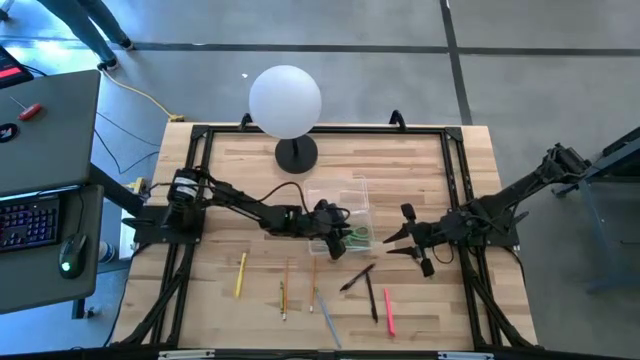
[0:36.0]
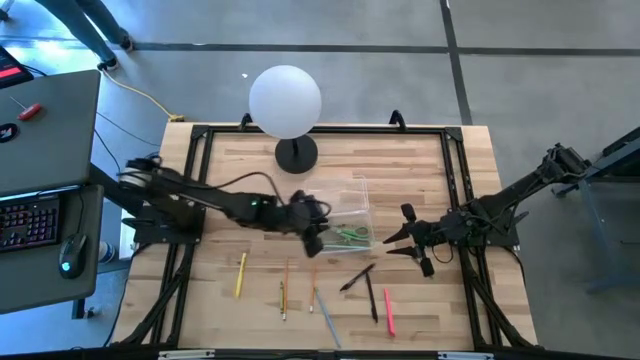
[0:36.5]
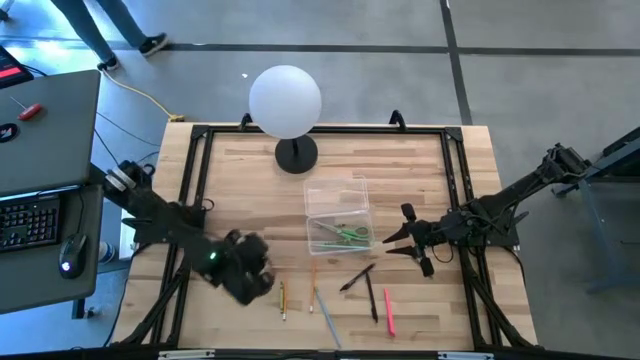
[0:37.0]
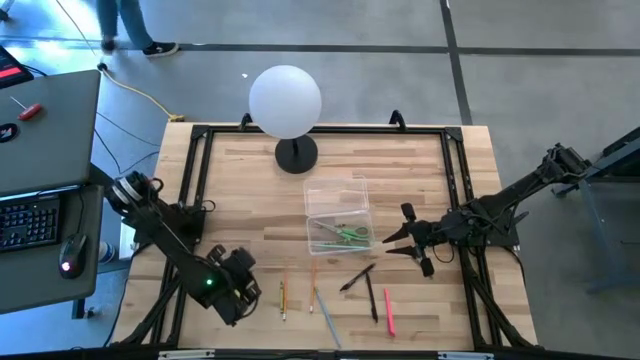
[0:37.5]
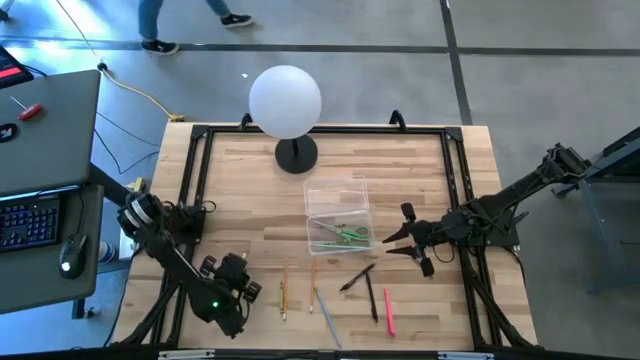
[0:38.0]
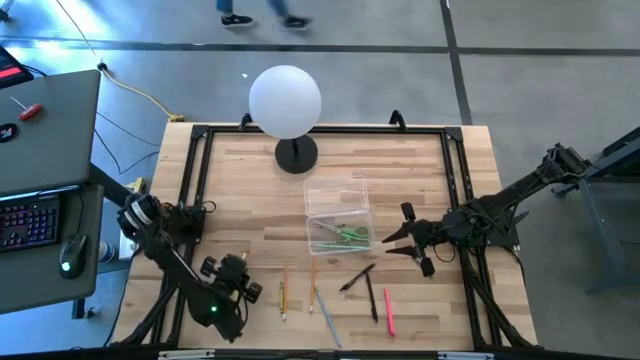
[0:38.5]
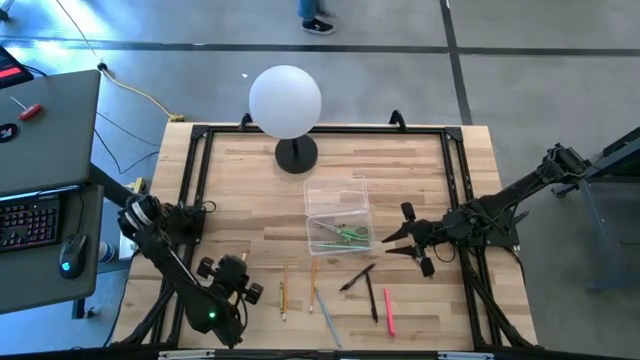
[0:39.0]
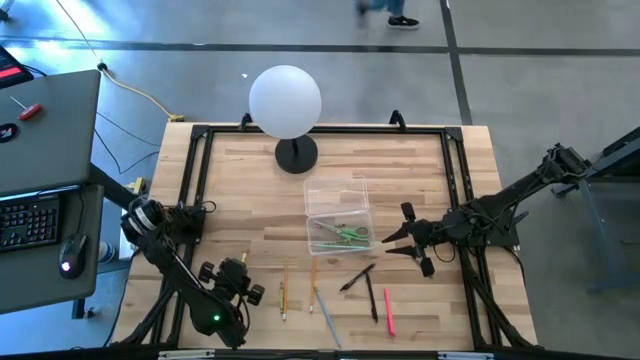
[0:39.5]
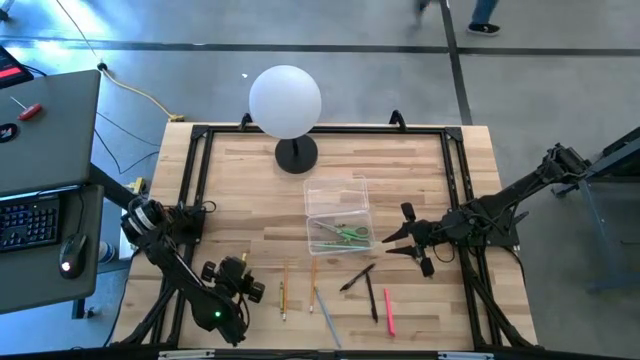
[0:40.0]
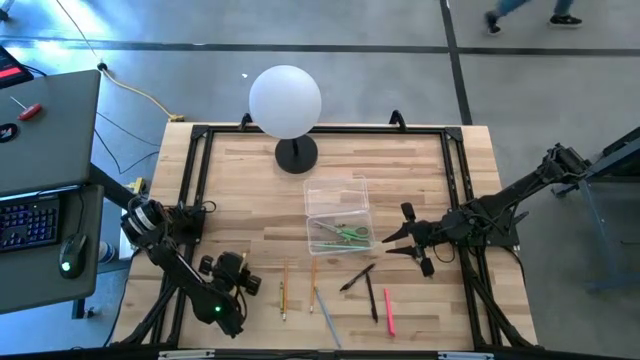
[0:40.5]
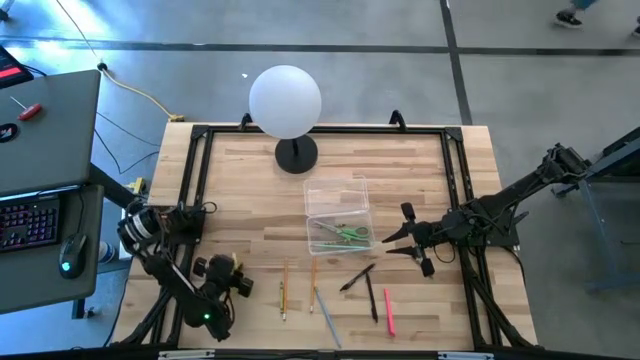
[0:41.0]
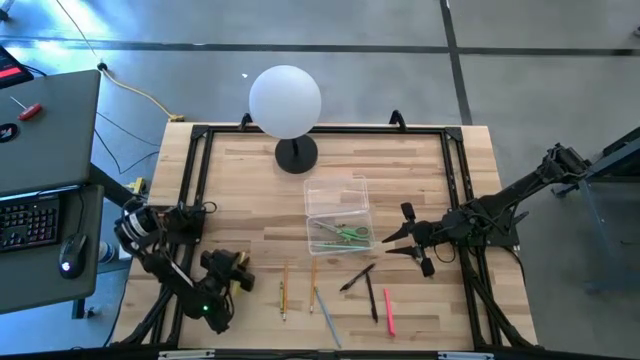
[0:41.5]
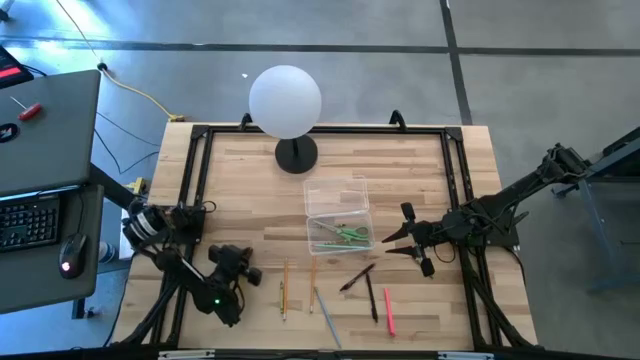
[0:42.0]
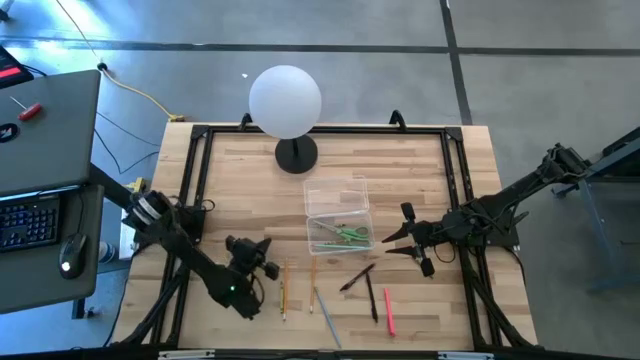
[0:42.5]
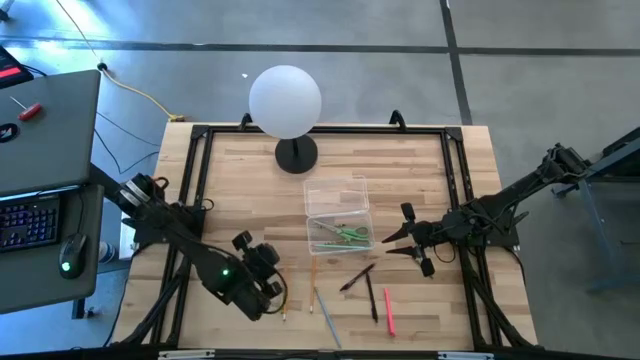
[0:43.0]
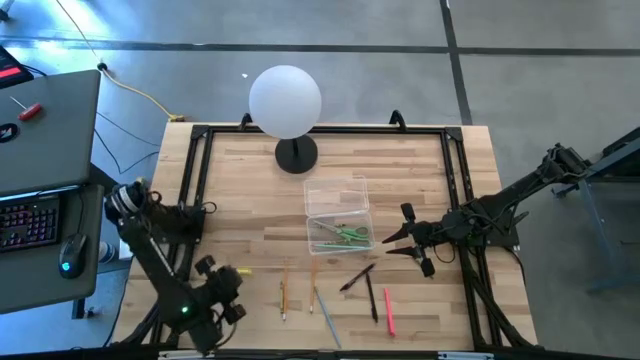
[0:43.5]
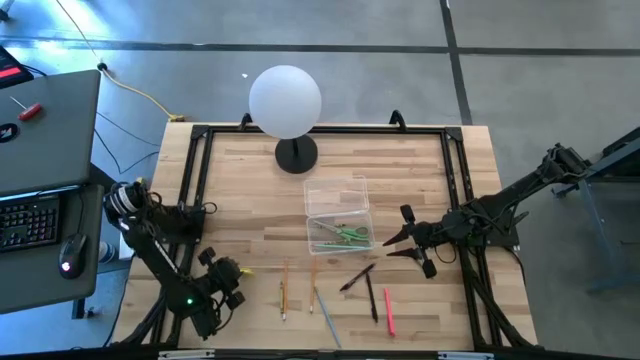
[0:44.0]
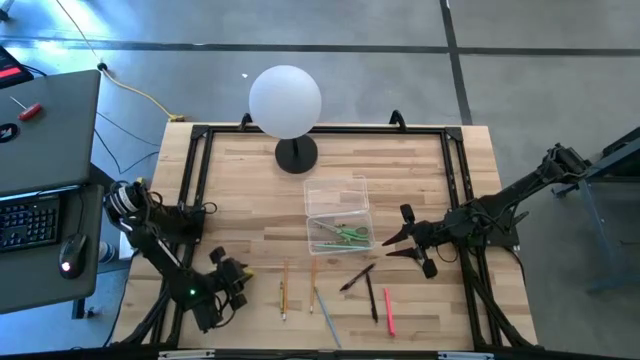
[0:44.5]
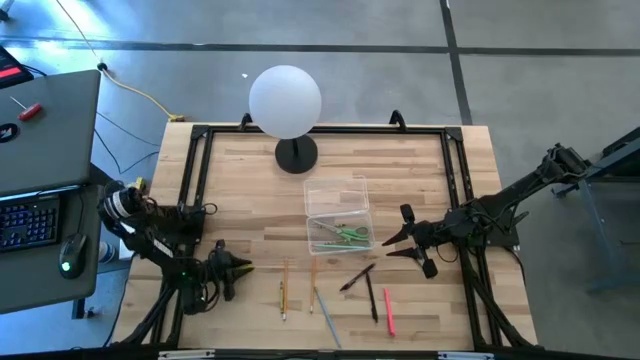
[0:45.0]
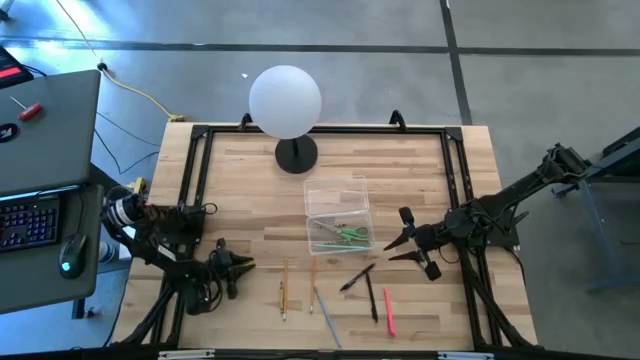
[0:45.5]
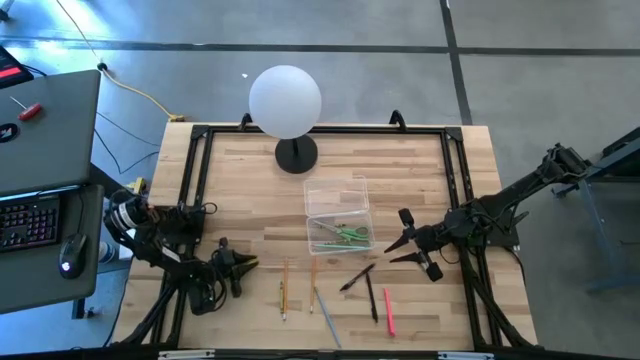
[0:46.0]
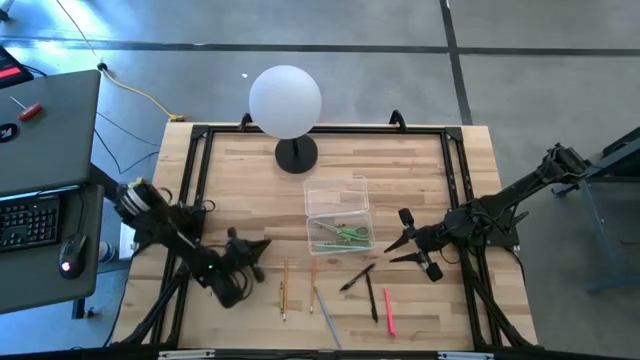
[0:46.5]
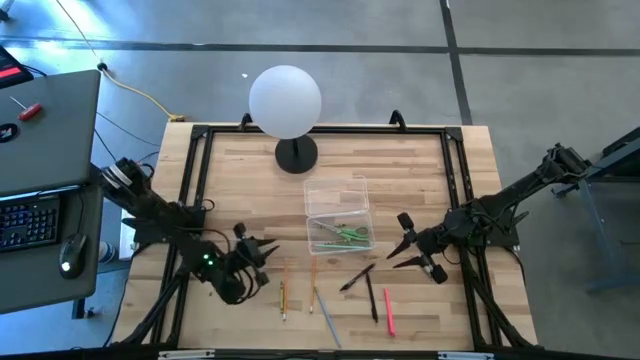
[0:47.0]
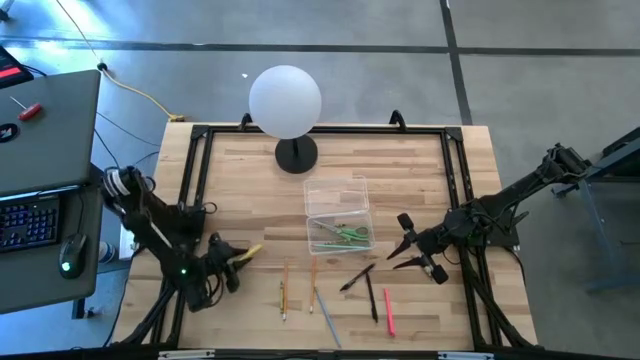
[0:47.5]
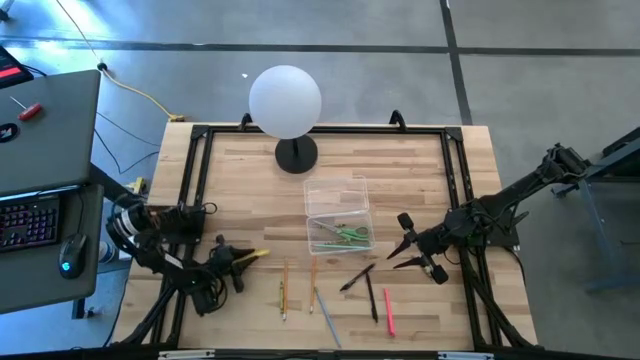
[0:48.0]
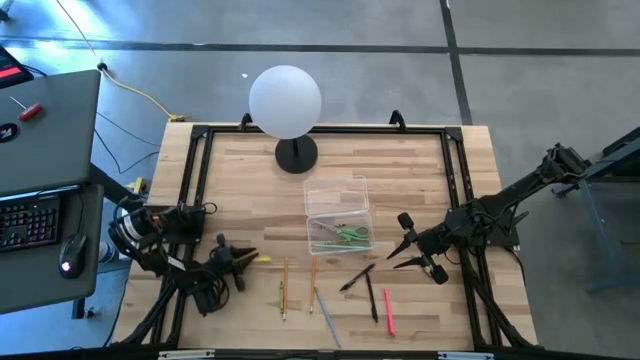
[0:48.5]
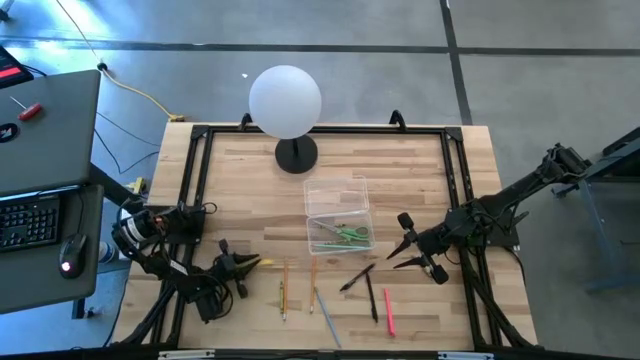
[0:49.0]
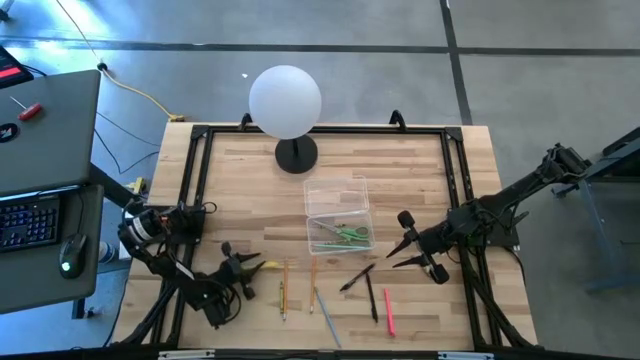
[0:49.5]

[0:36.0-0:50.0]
Task: Pick & place school supplies into a supply box
Put the light green crayon into the transparent supply box

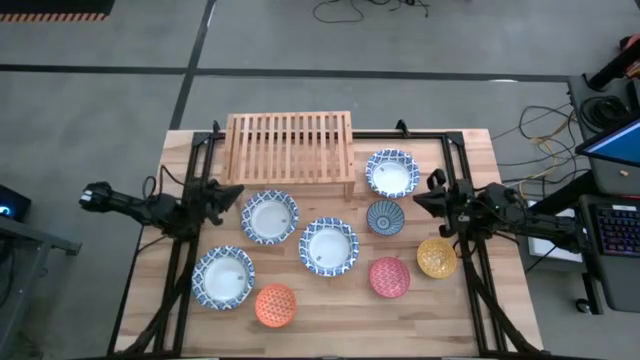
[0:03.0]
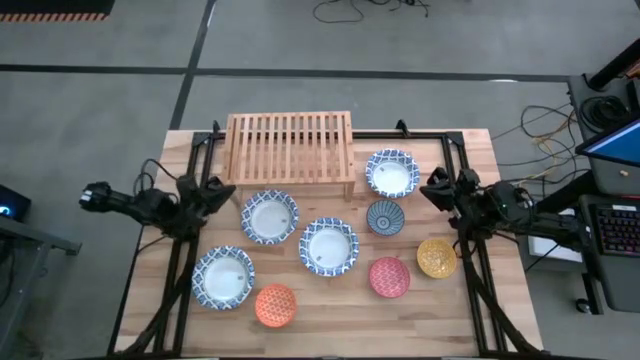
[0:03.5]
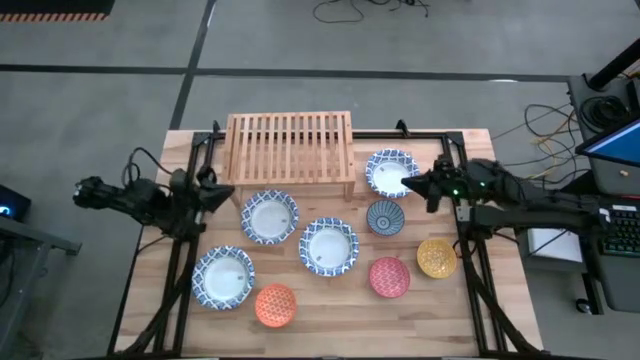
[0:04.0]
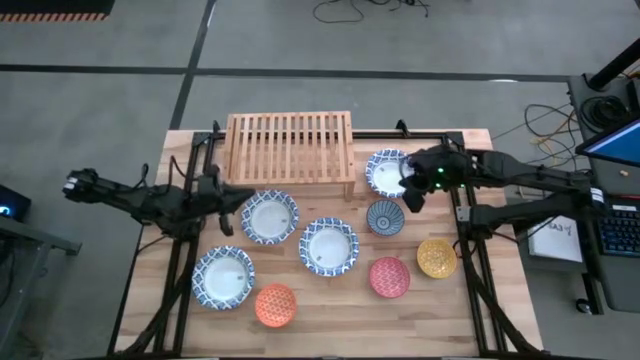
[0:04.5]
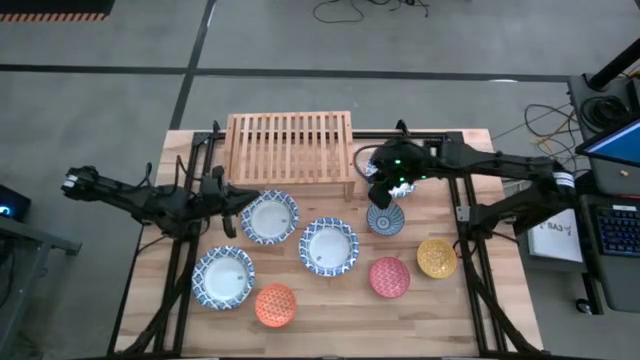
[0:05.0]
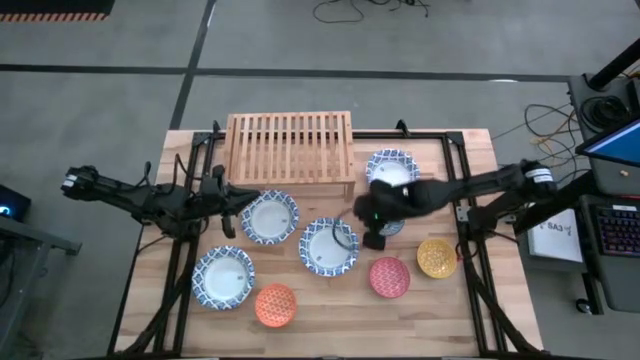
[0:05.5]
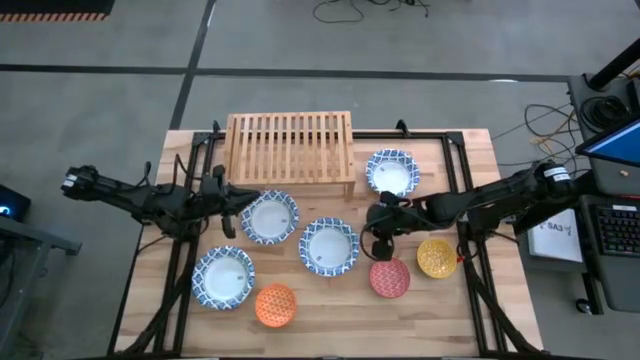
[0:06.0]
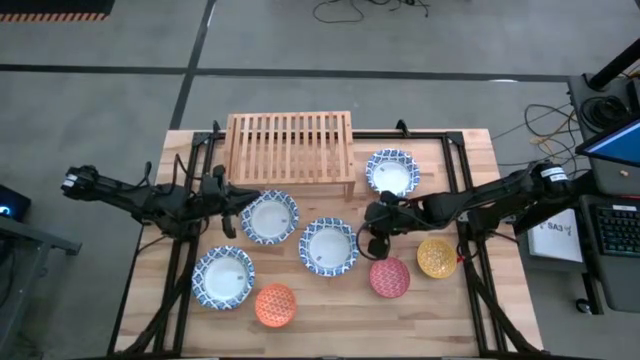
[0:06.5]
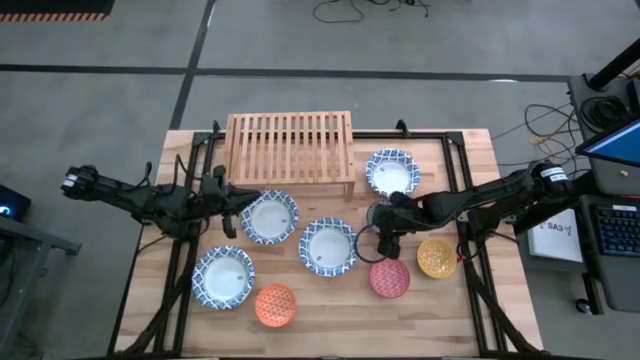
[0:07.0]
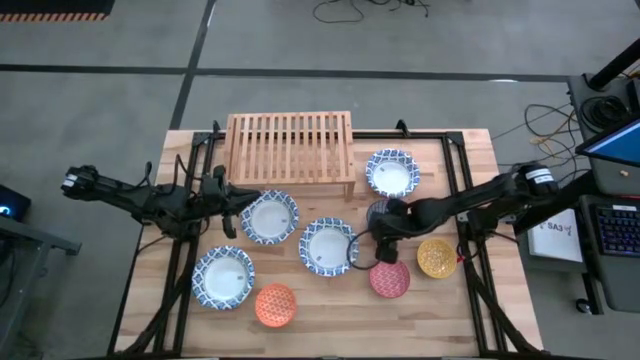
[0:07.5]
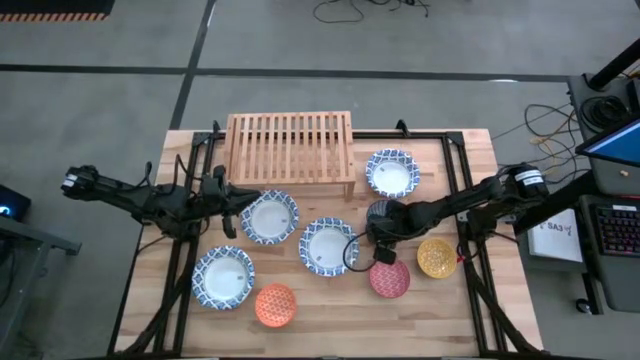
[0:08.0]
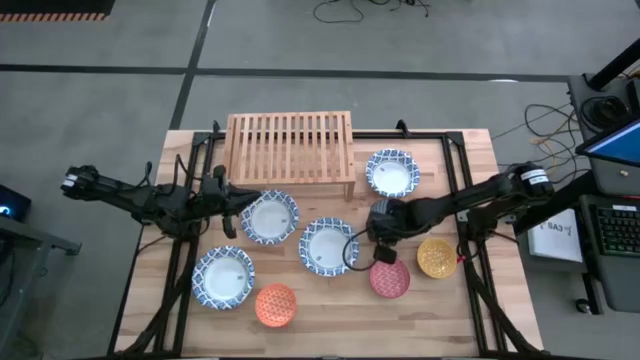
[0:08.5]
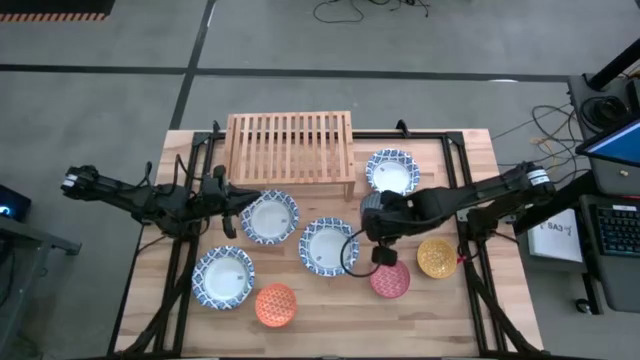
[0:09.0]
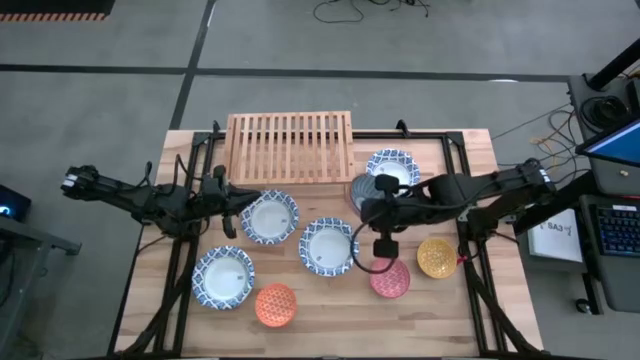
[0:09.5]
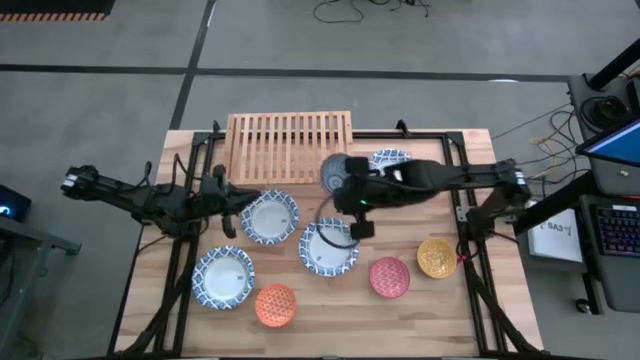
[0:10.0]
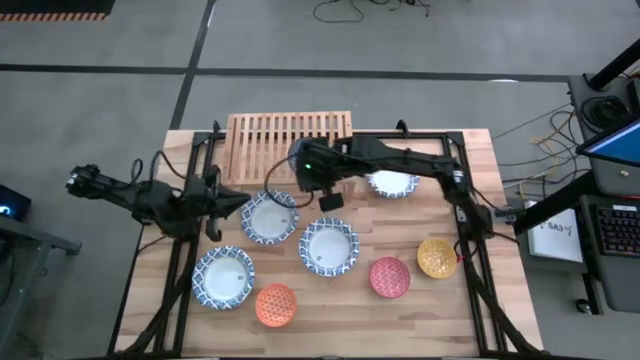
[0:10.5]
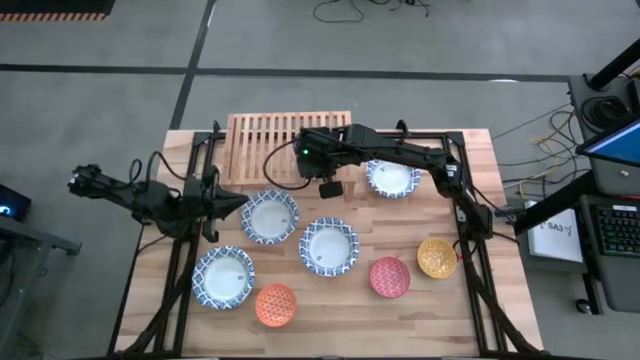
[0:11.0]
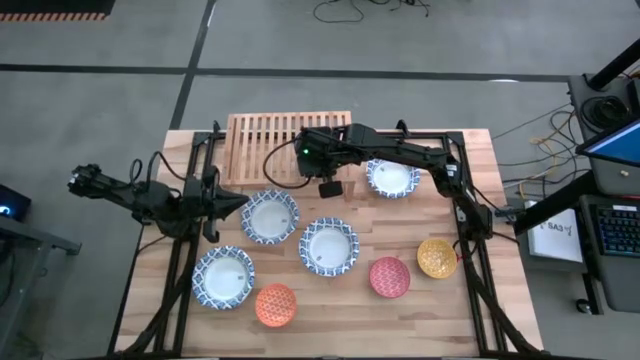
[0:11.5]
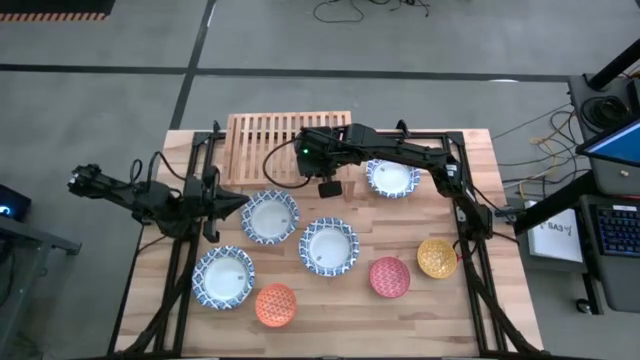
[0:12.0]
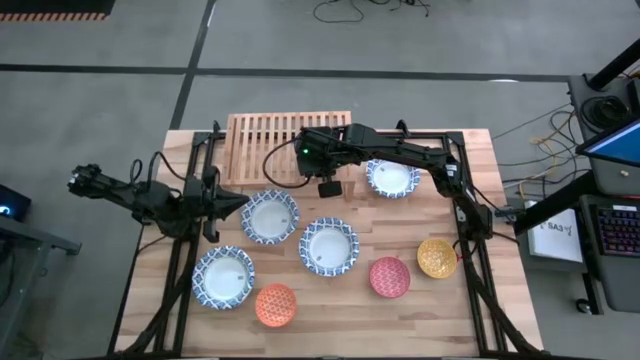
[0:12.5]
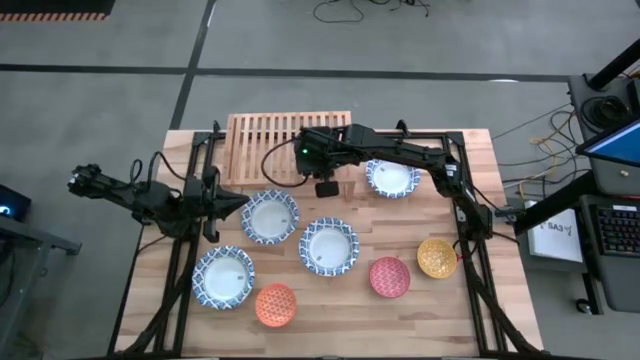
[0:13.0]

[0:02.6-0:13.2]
Task: Place and stack bowls onto a shelf
Put the blue pattern bowl on the shelf
